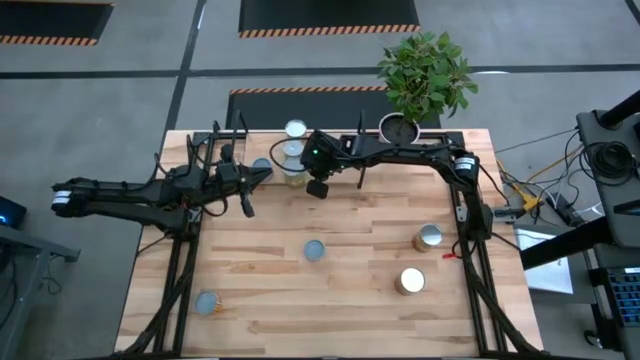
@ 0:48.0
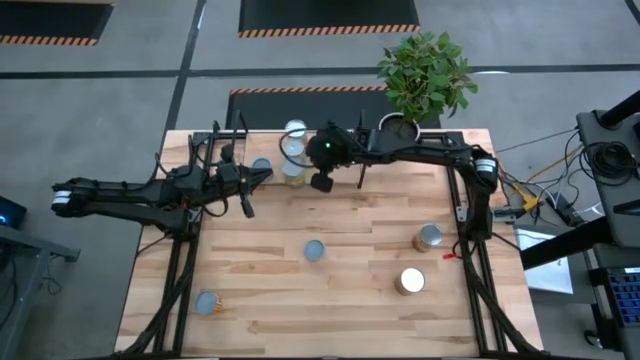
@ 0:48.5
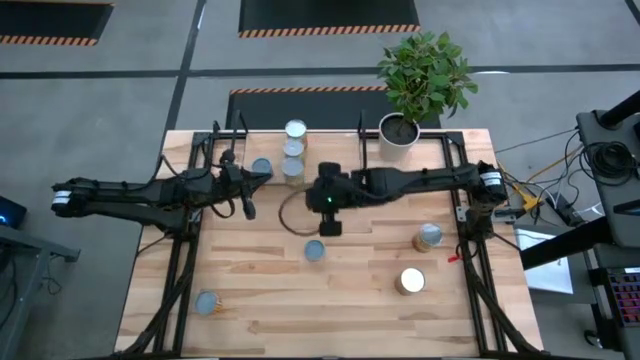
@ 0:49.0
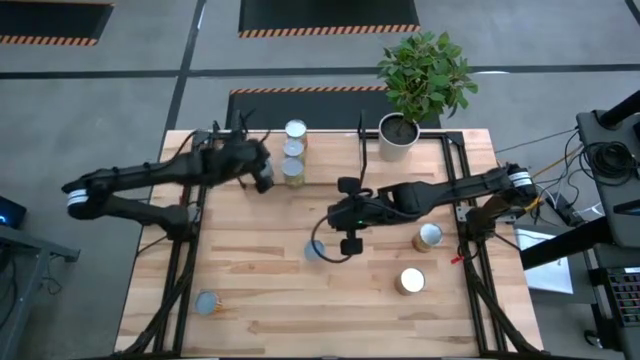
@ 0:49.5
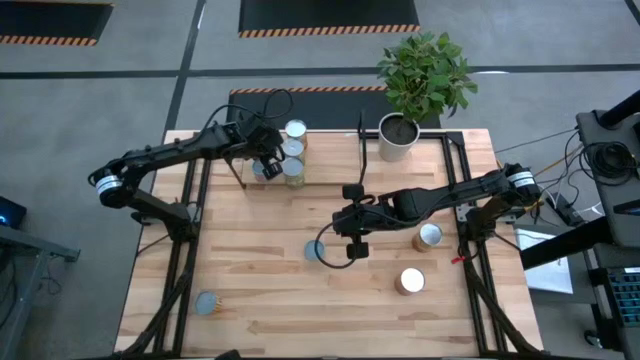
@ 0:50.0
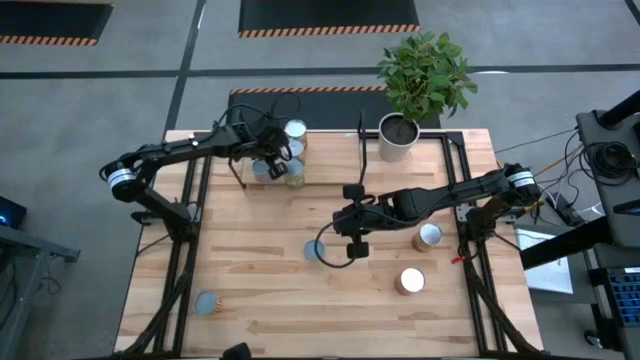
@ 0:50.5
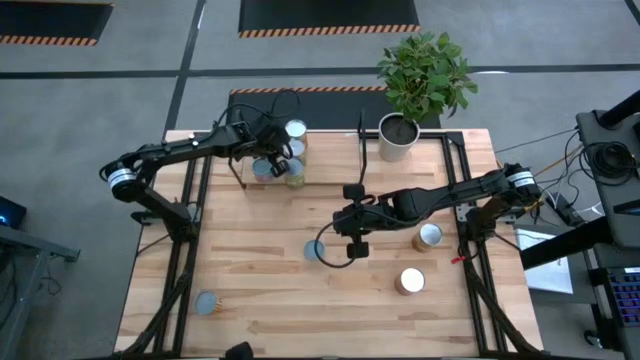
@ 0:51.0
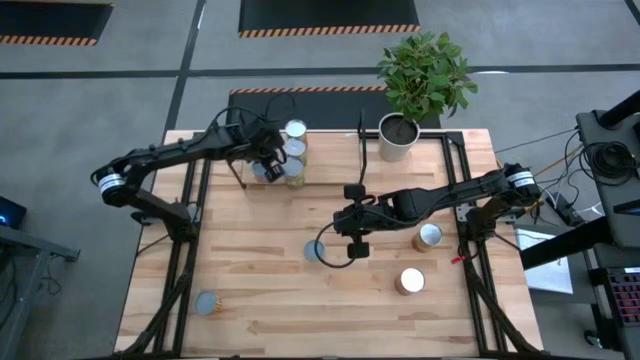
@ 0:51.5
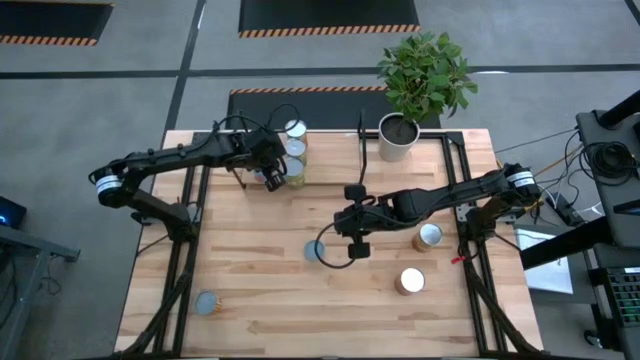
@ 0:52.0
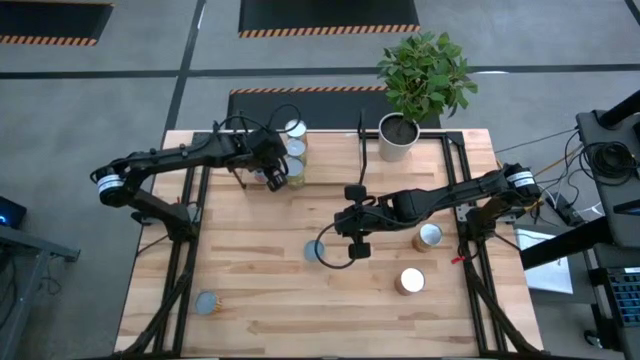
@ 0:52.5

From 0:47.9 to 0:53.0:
Task: Pick and place cans onto a shelf
Adjust the canned oranges on the shelf

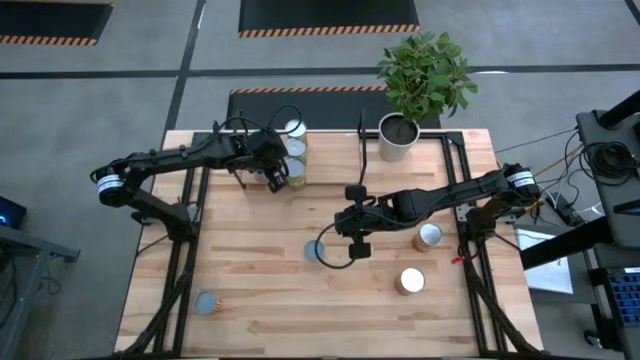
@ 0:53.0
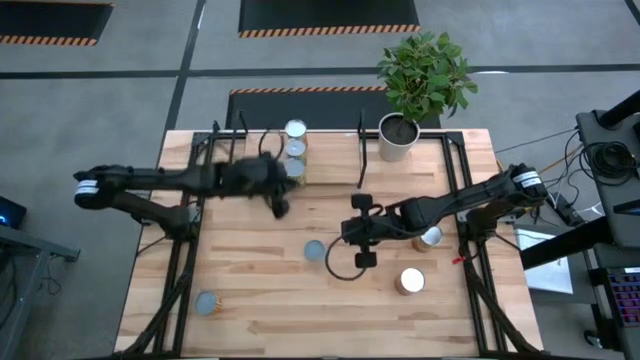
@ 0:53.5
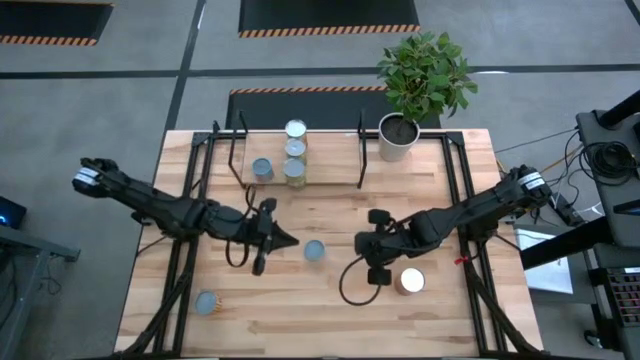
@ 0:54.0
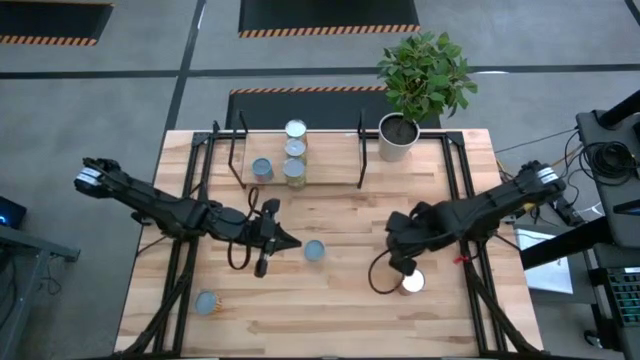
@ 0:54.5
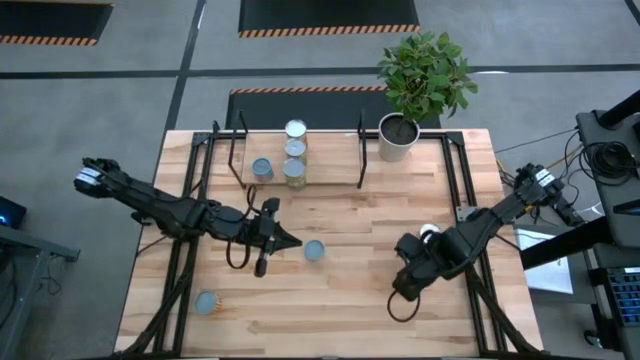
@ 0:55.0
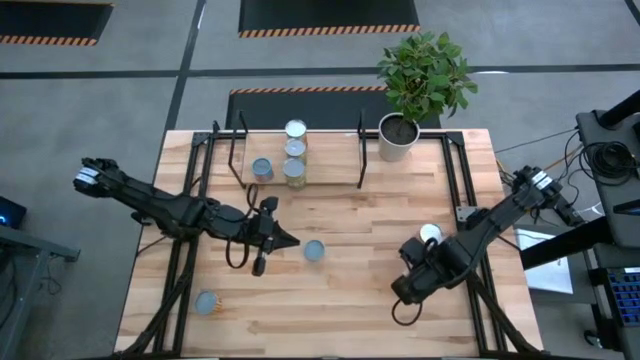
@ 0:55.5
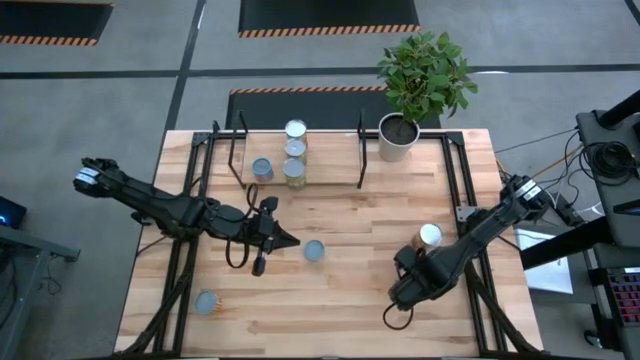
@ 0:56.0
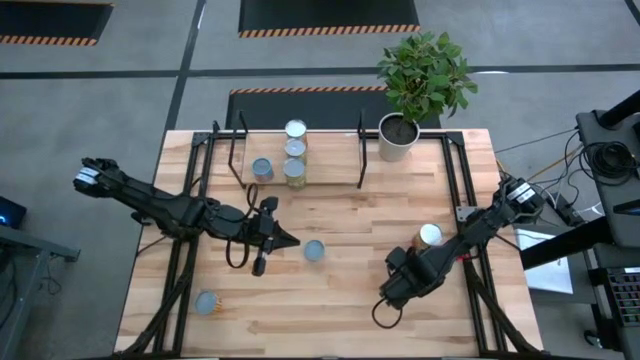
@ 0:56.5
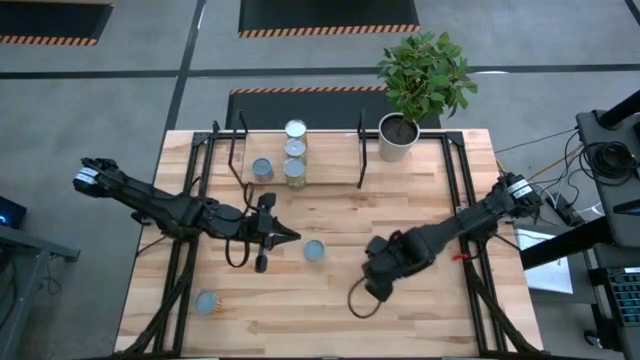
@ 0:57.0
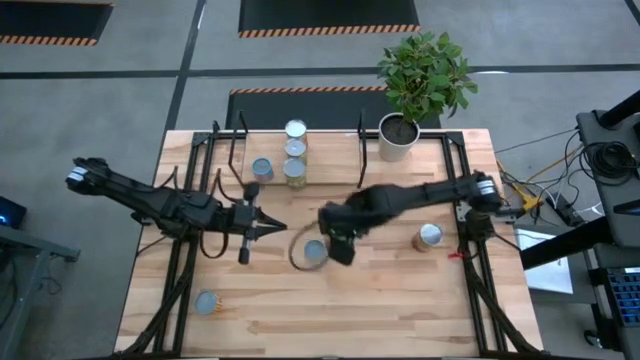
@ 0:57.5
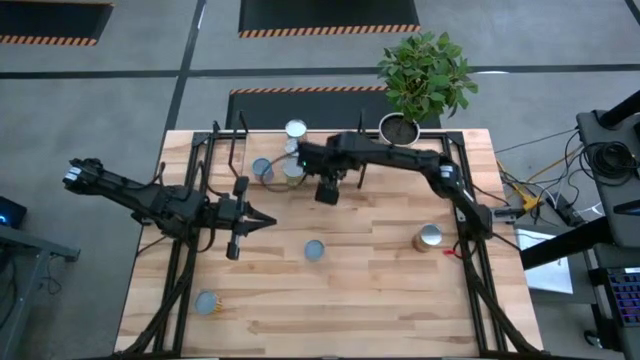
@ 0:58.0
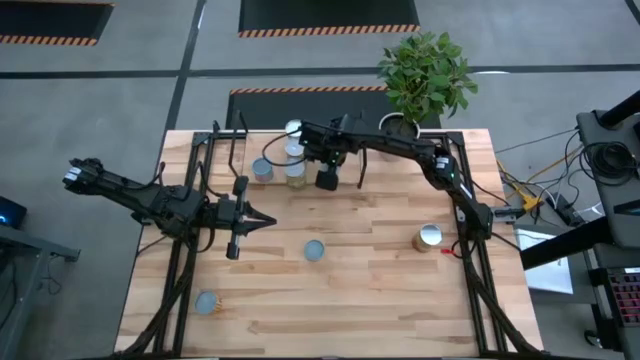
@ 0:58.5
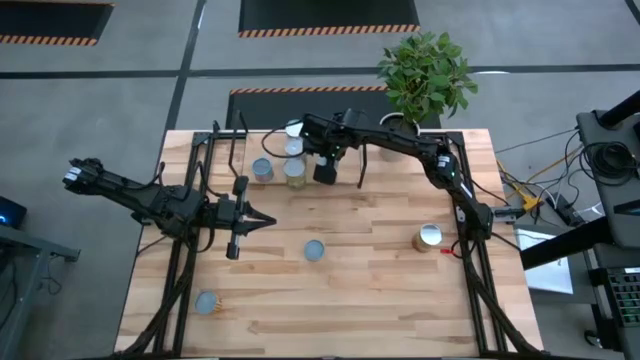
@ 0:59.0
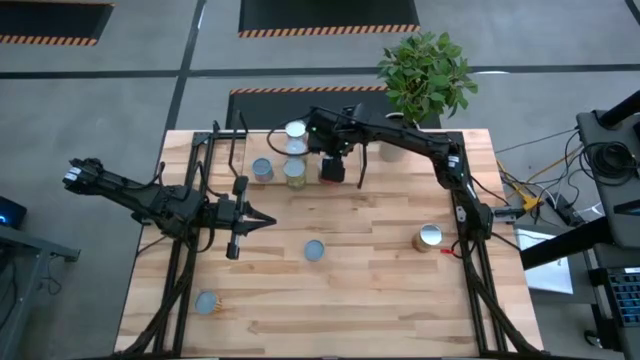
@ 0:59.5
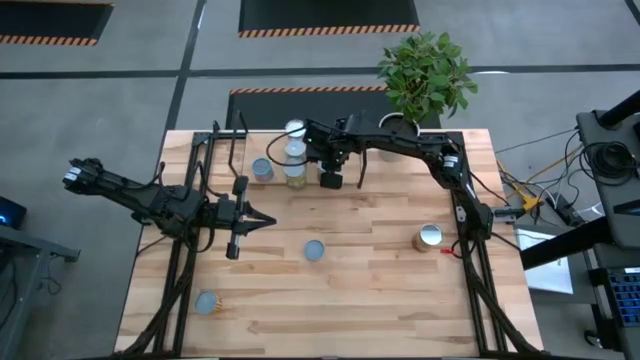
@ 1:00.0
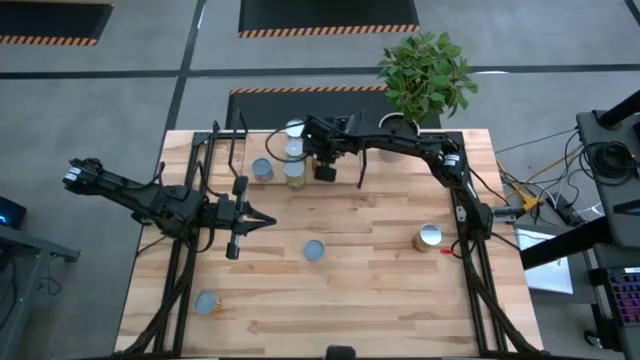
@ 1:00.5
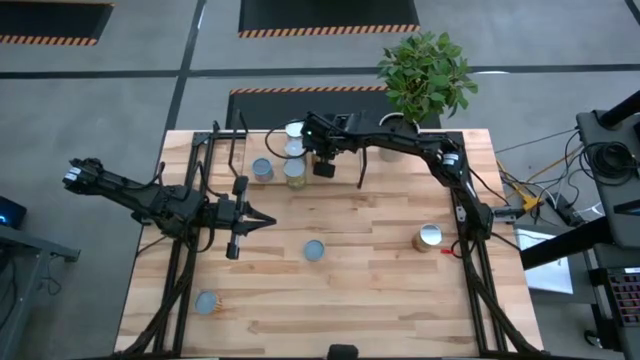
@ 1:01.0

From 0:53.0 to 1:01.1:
Put the canned beans on the shelf

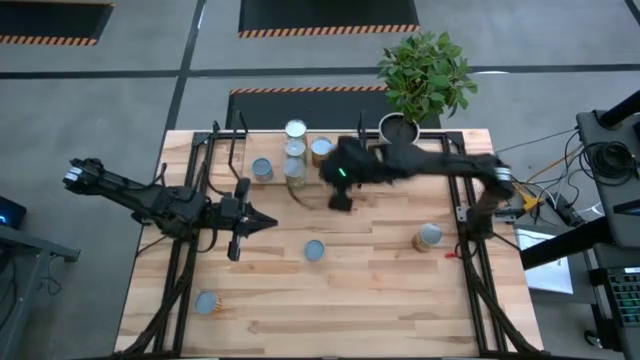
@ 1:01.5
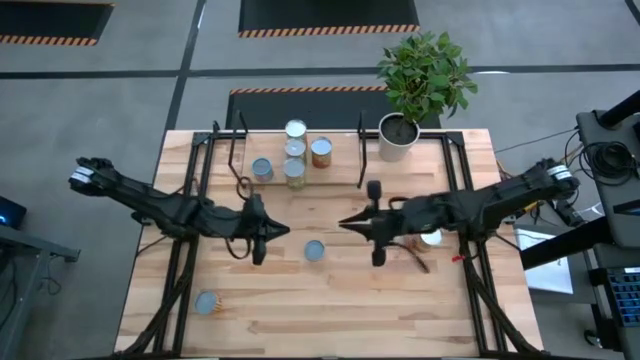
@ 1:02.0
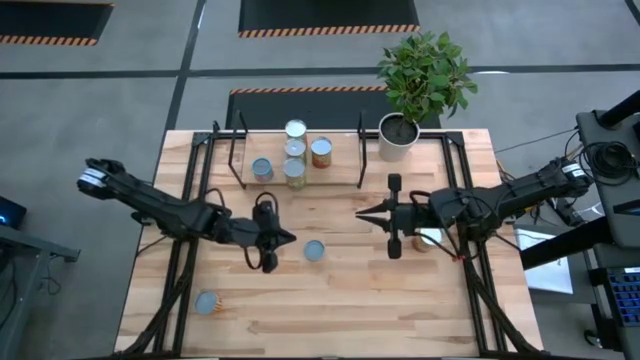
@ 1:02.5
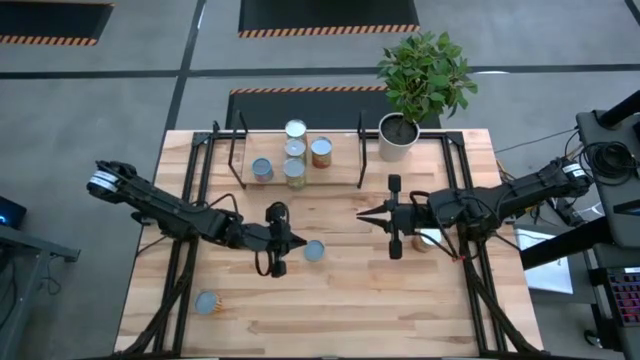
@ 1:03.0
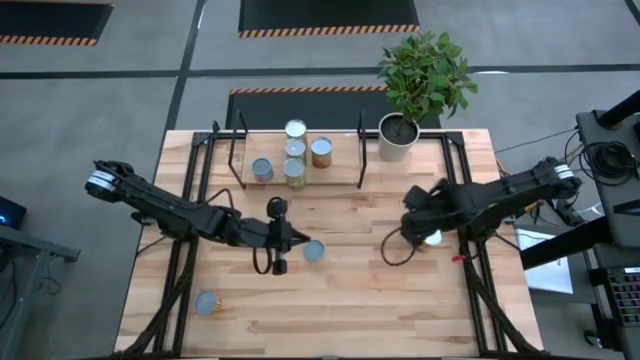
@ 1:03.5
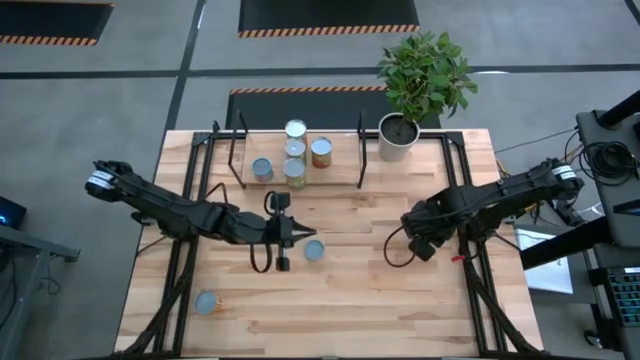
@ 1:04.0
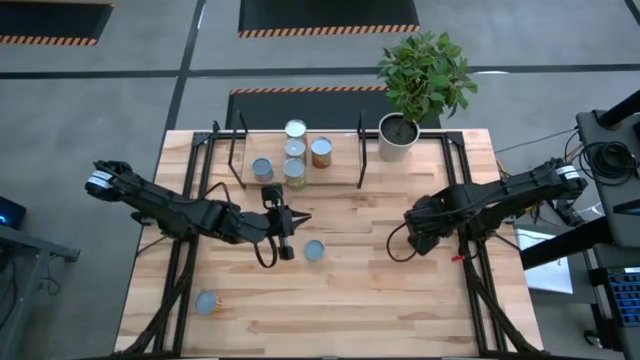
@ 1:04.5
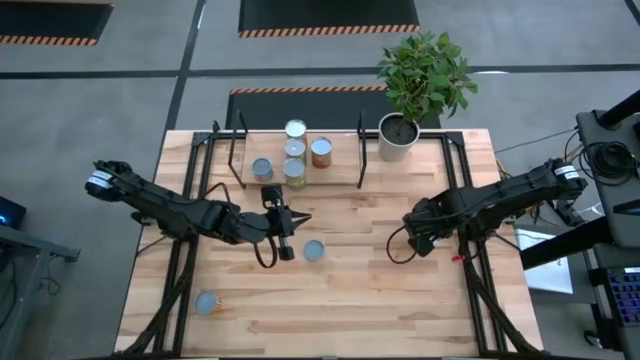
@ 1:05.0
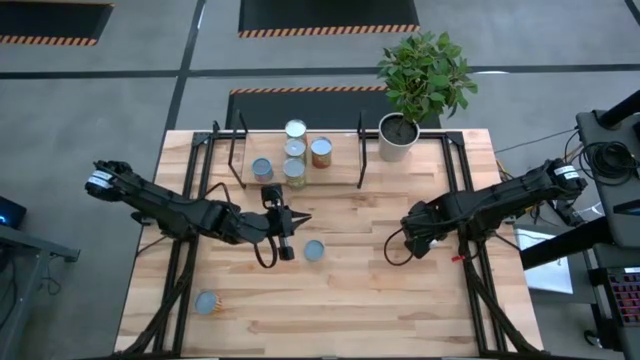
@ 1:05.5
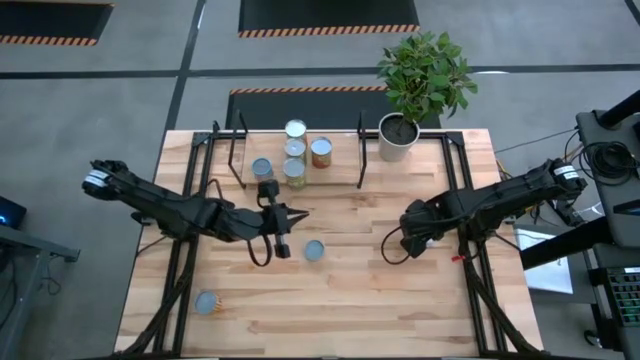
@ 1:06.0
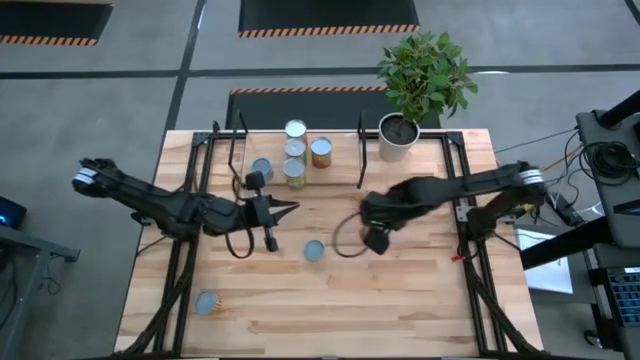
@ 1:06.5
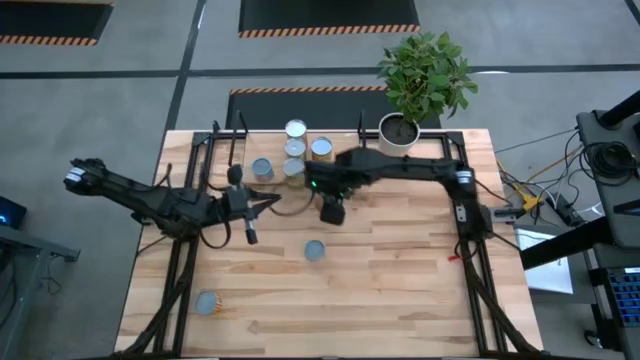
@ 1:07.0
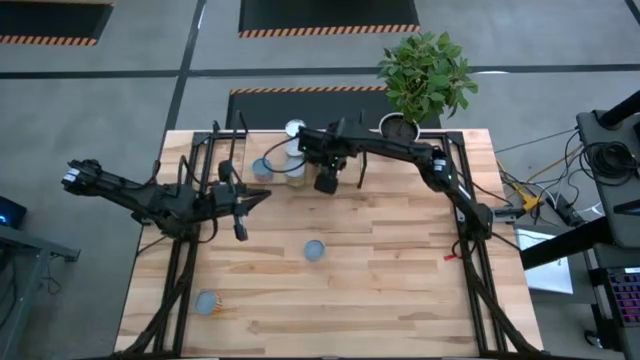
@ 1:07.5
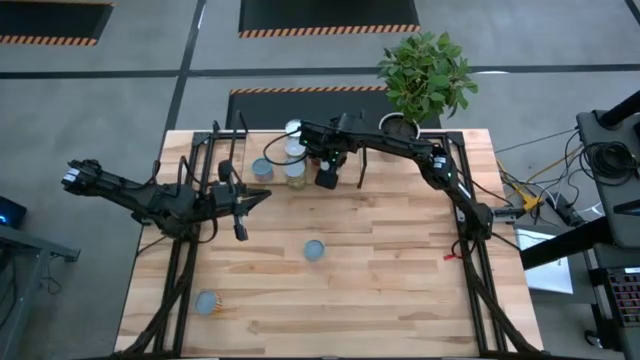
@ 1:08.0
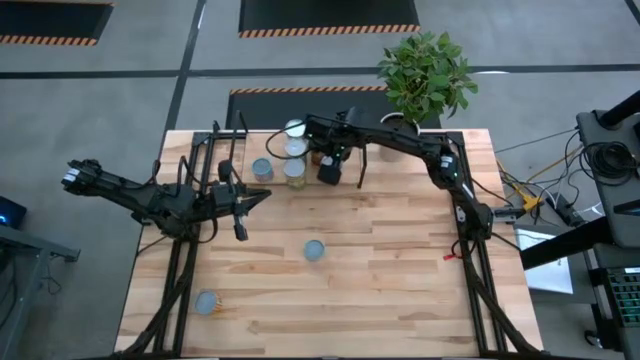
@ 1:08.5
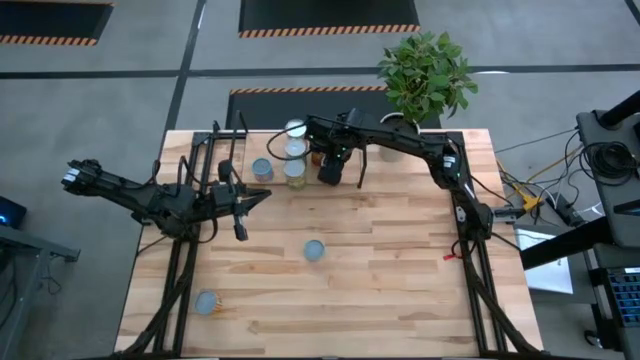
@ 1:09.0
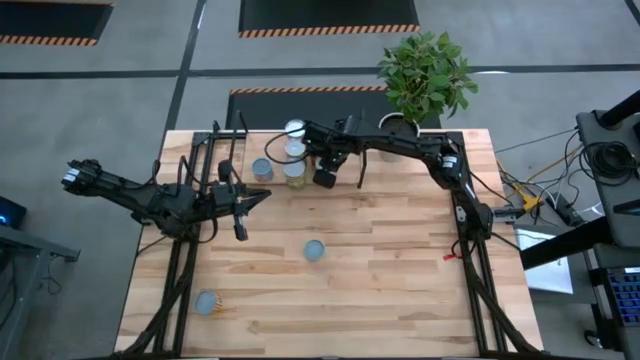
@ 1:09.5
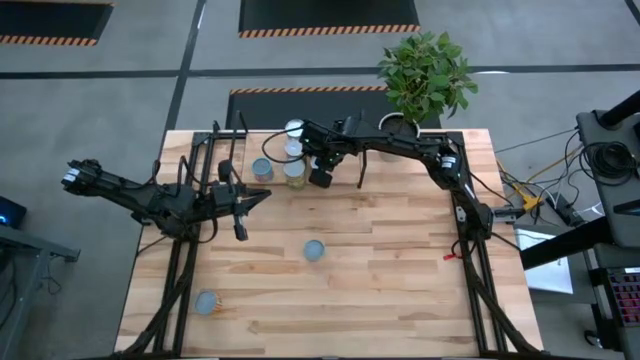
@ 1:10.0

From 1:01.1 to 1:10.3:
Put the canned corn on the shelf
